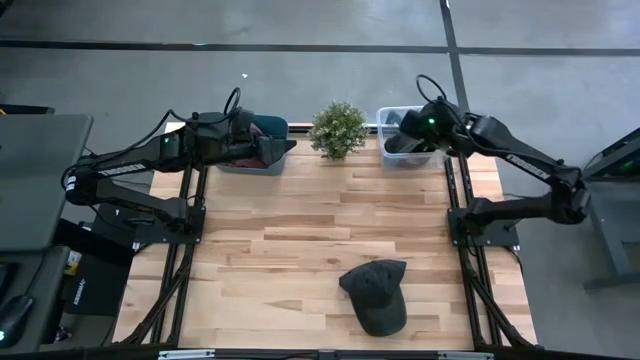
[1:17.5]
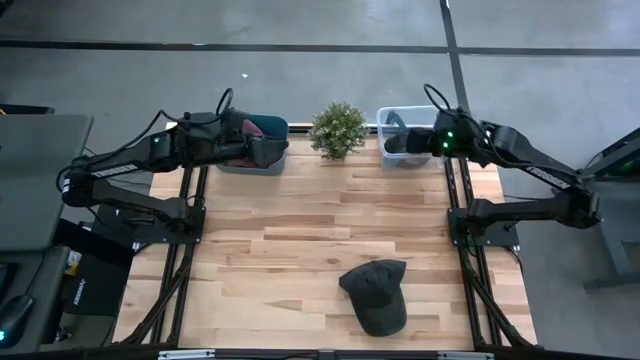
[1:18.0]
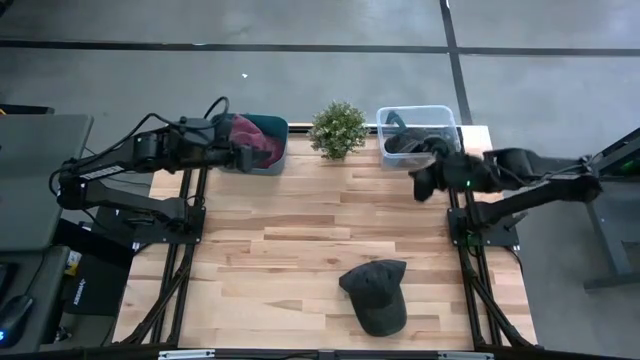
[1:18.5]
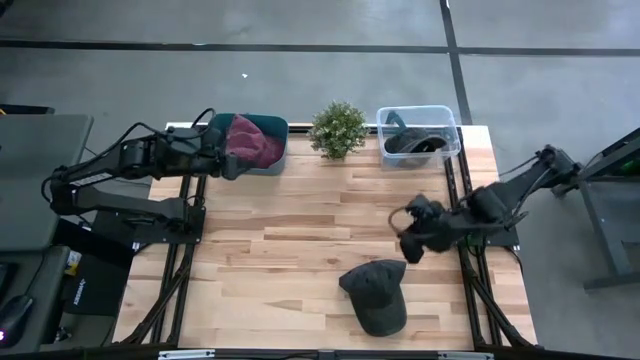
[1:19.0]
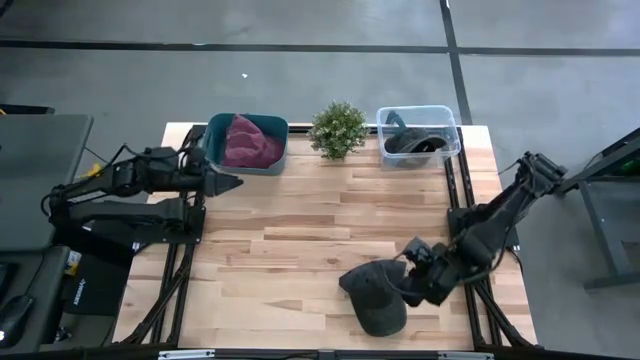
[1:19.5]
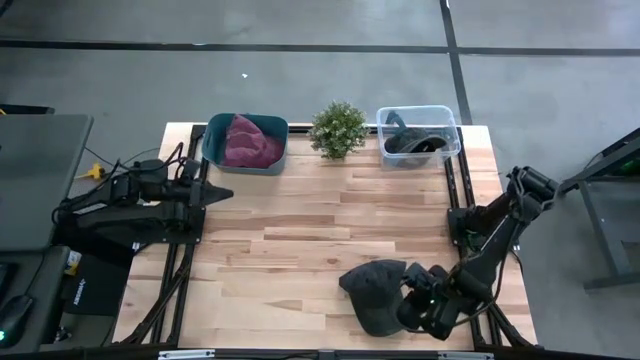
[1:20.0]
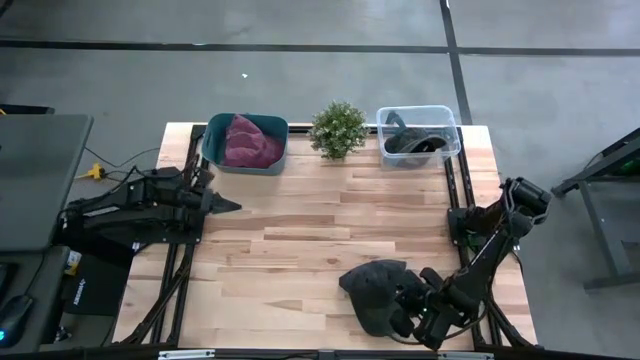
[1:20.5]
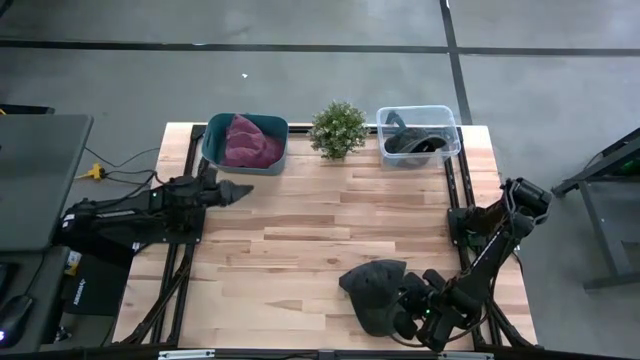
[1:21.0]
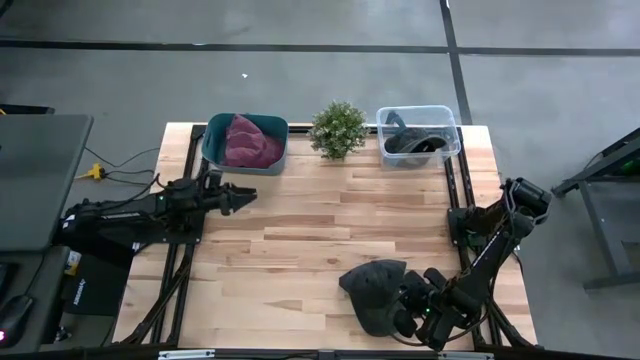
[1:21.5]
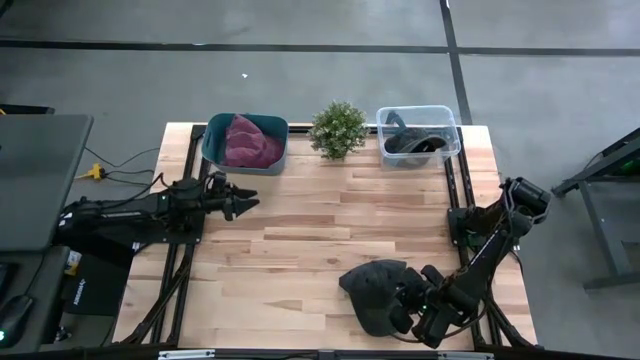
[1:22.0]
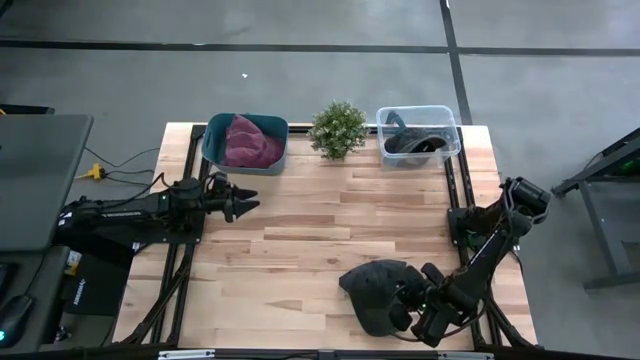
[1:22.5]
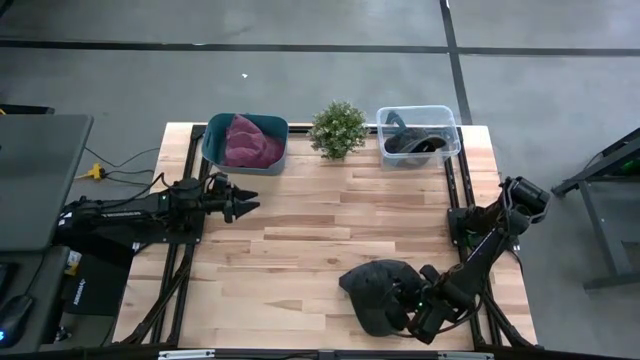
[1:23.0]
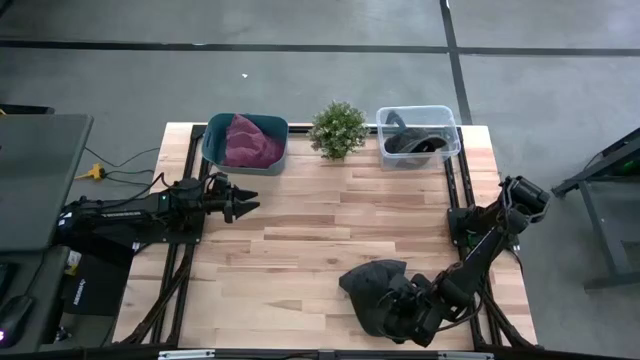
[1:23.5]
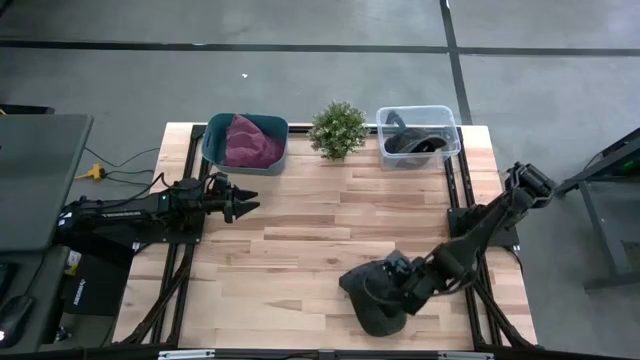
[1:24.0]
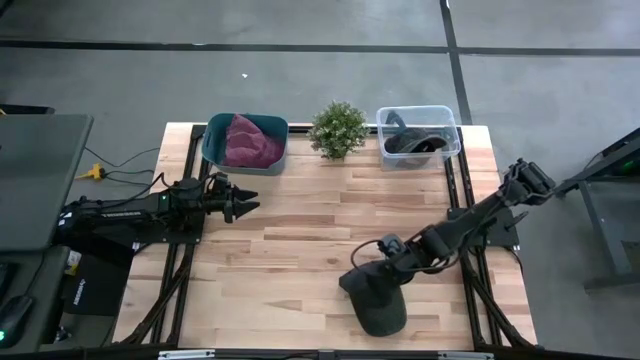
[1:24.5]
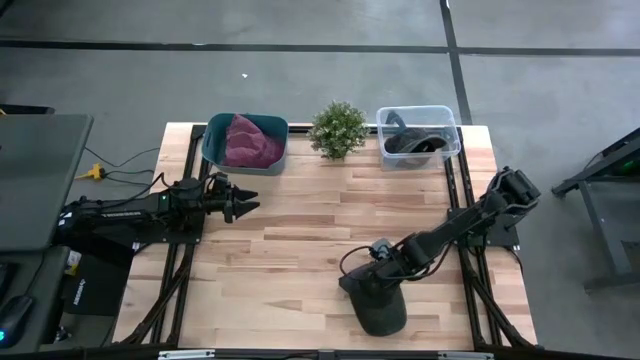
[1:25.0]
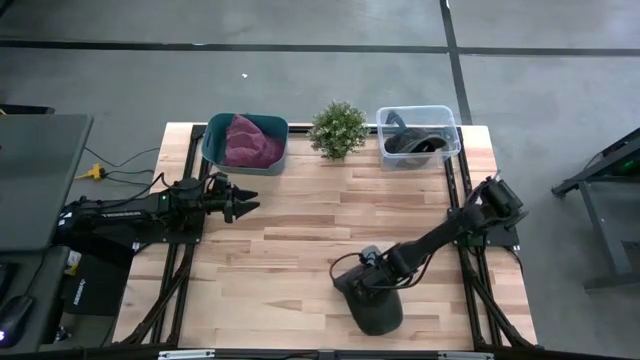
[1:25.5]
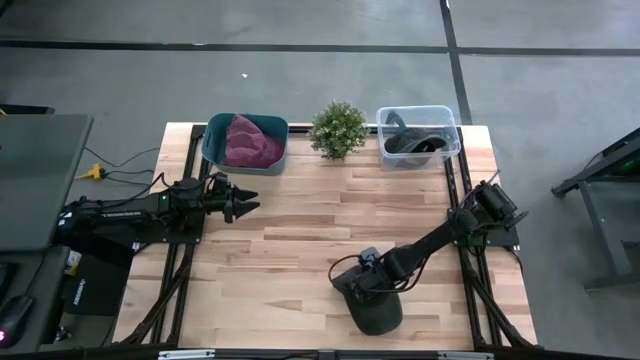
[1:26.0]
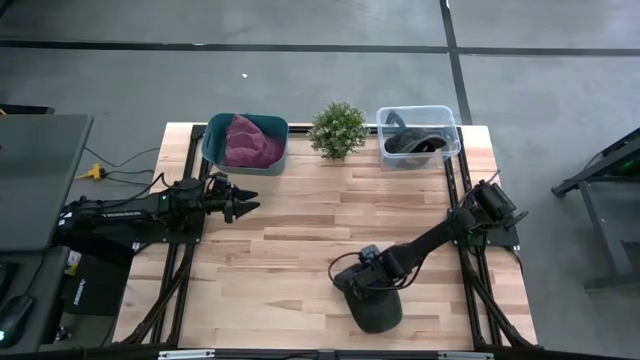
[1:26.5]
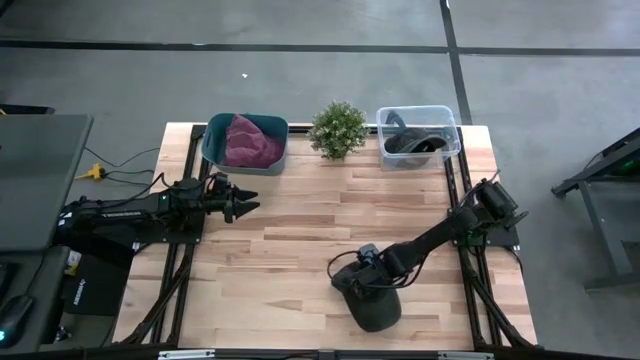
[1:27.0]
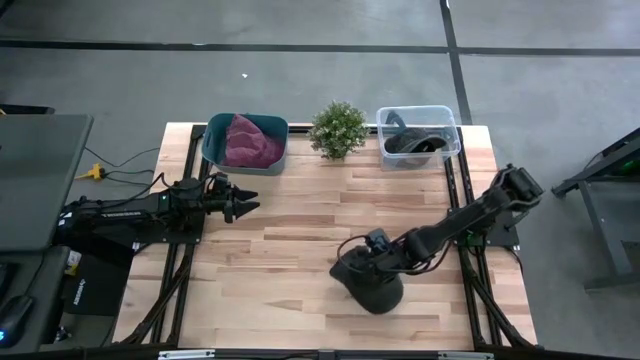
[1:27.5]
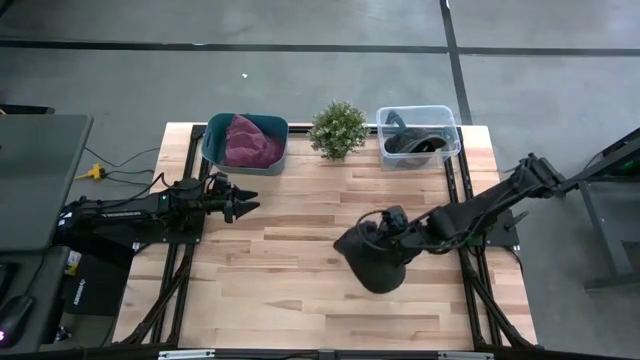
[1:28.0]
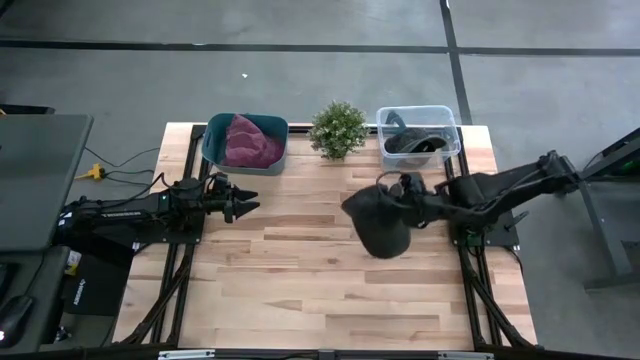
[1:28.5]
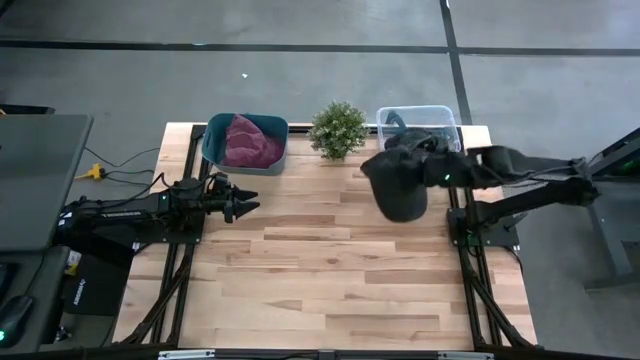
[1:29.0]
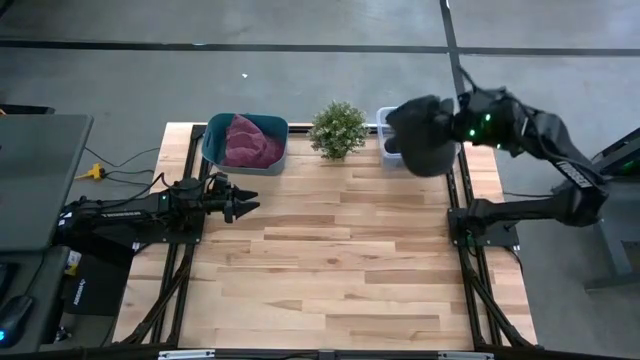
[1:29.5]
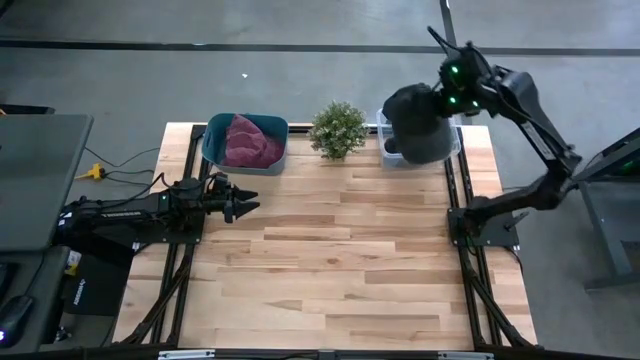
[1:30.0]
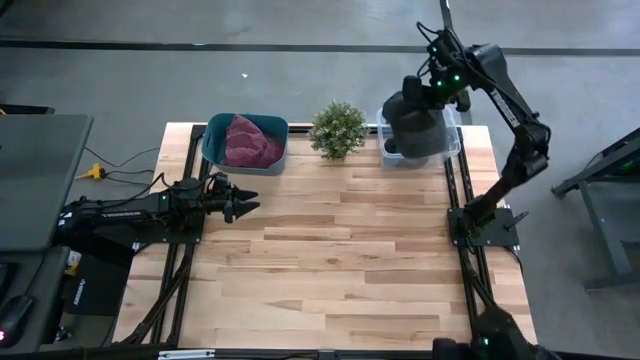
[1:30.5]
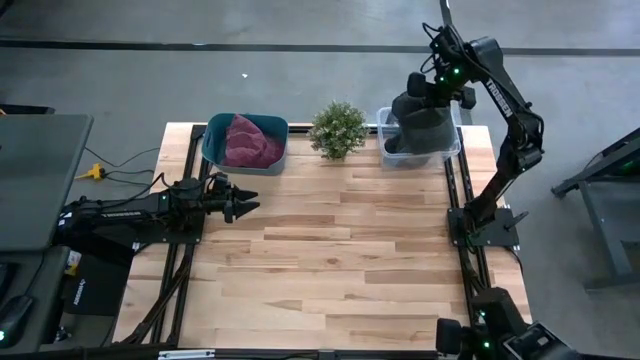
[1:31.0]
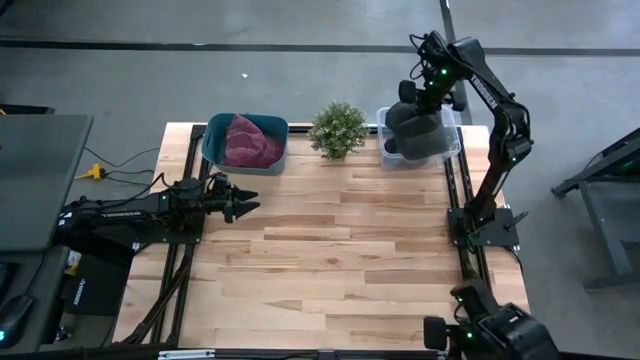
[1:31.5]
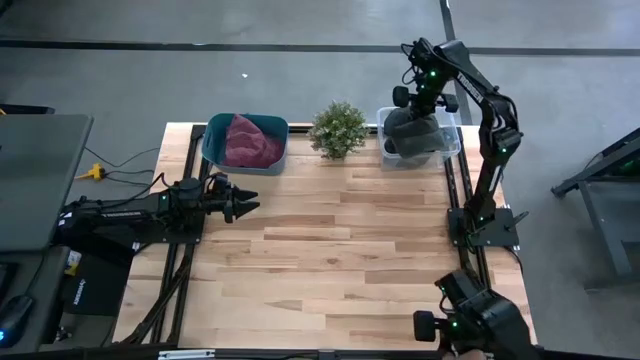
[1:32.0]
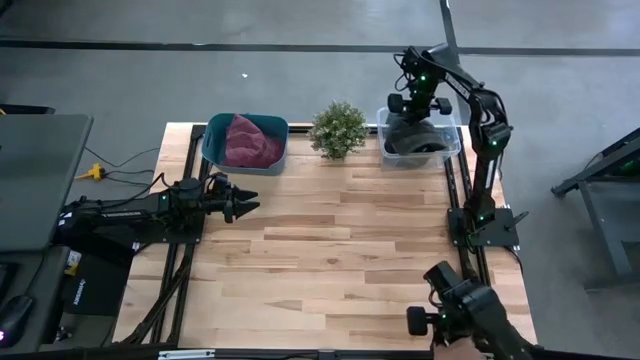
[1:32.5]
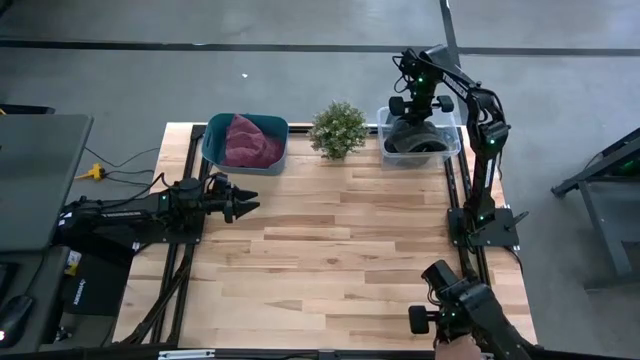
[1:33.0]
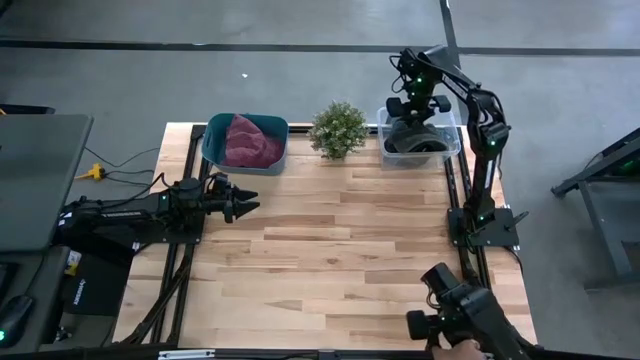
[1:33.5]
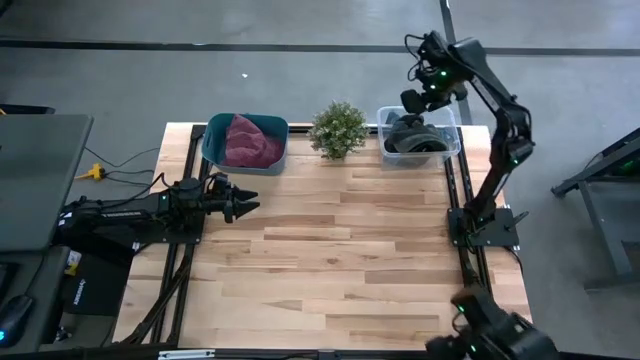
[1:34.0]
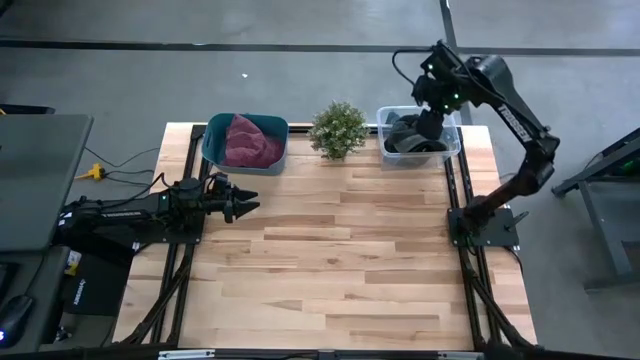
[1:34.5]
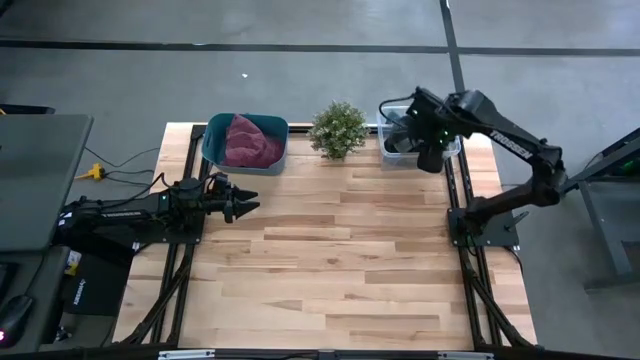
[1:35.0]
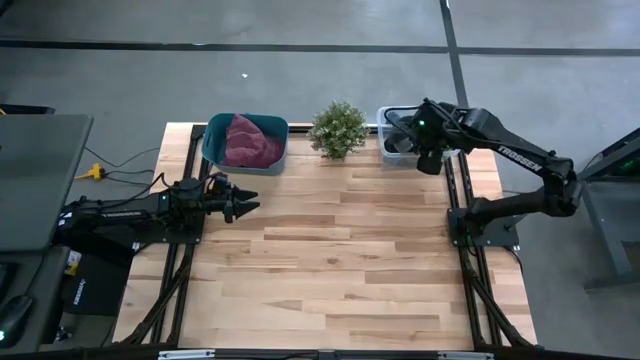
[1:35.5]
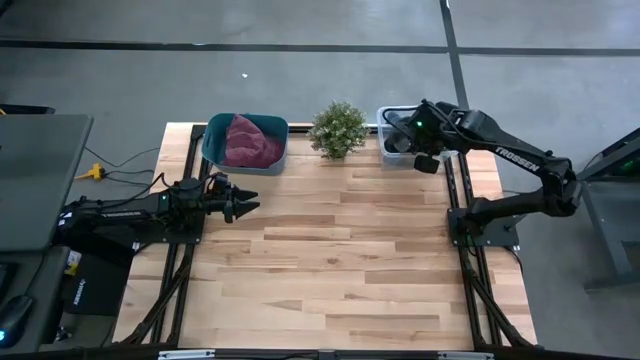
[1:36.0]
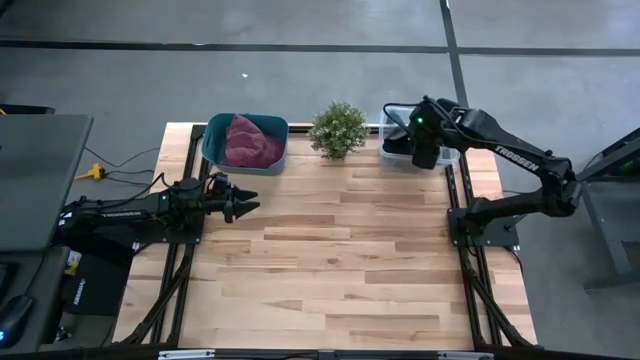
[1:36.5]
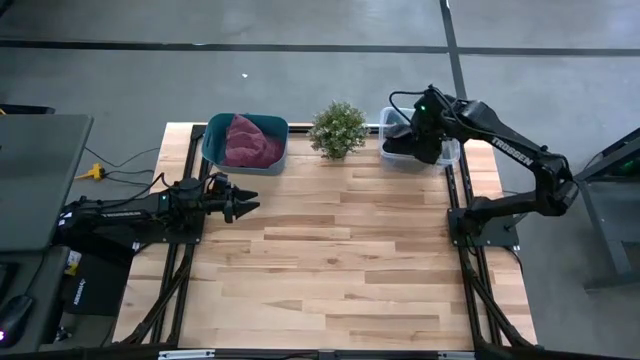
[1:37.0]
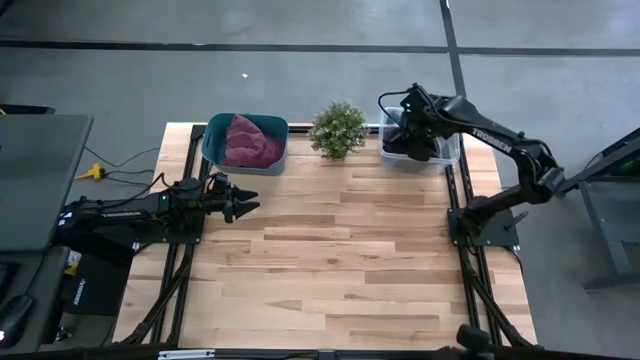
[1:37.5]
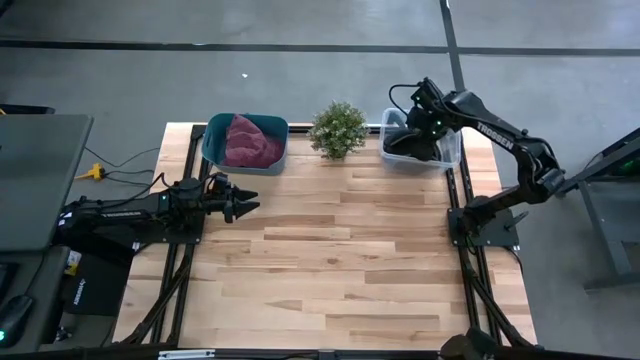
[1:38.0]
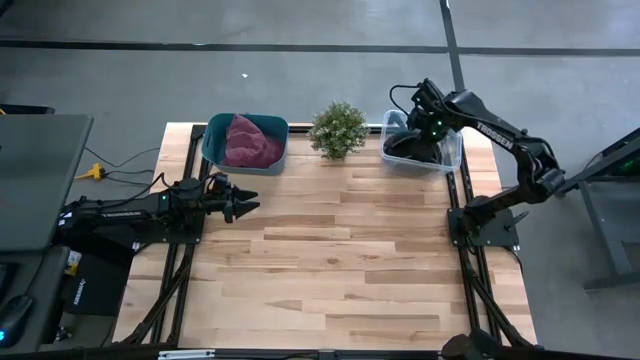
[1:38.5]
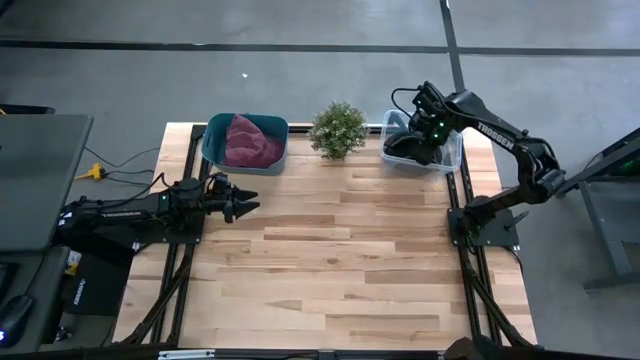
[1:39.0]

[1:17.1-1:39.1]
Task: Pick & Place hat
Put the black cap into the transparent bin
